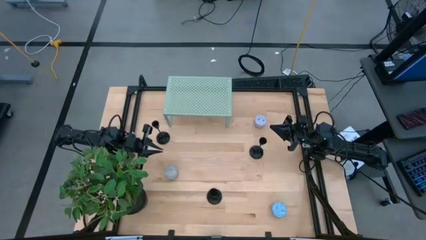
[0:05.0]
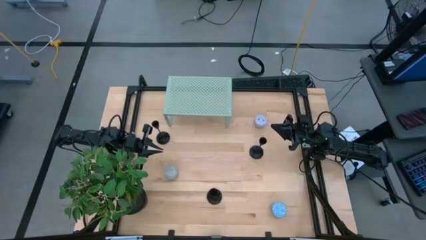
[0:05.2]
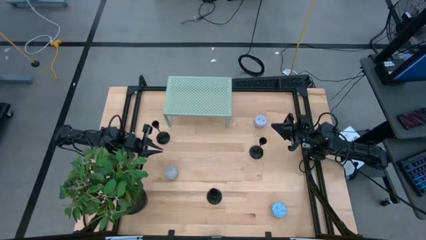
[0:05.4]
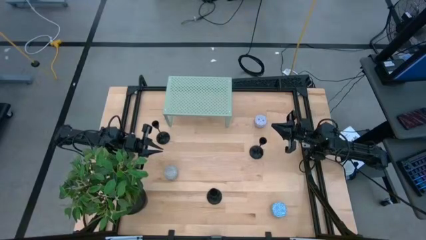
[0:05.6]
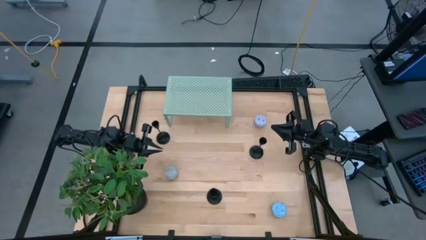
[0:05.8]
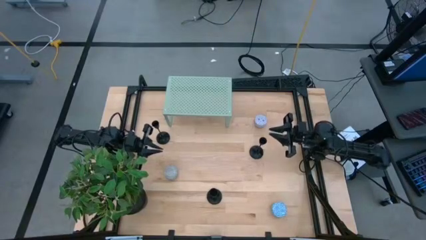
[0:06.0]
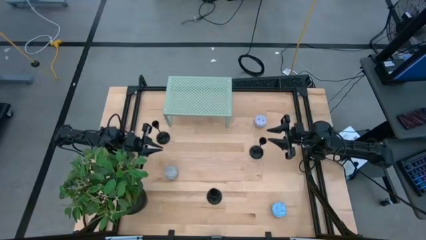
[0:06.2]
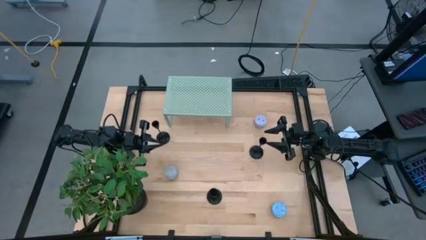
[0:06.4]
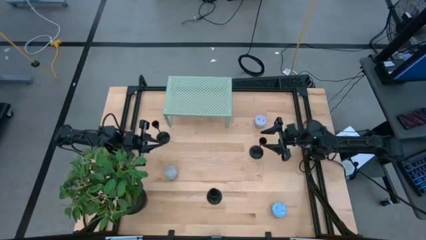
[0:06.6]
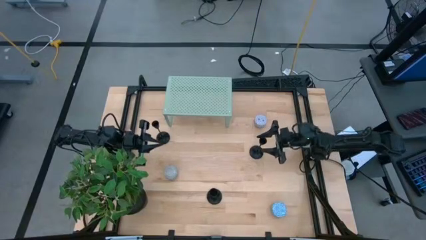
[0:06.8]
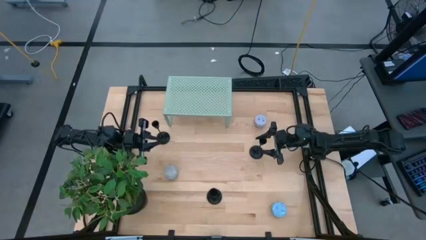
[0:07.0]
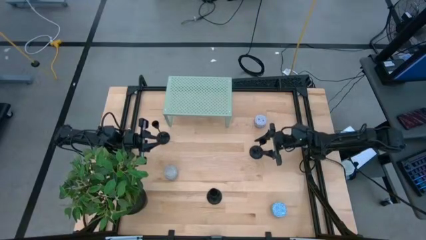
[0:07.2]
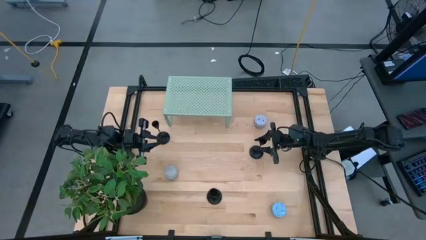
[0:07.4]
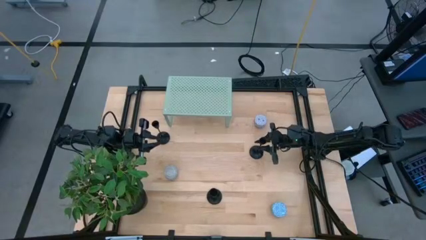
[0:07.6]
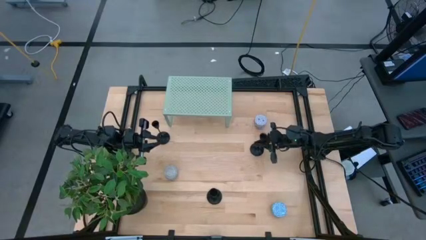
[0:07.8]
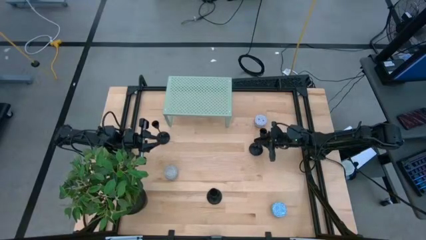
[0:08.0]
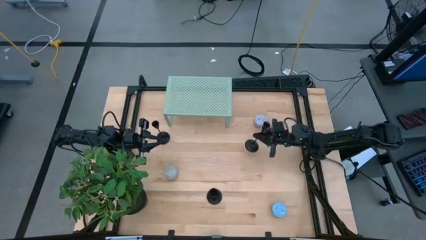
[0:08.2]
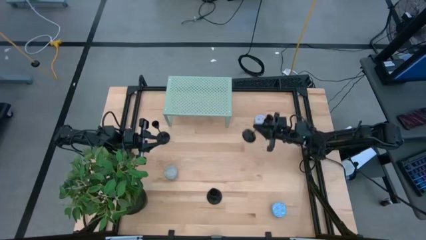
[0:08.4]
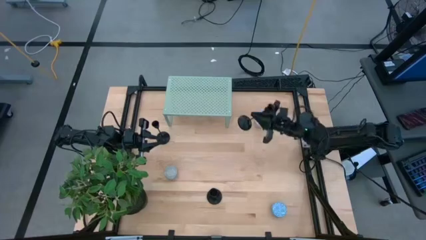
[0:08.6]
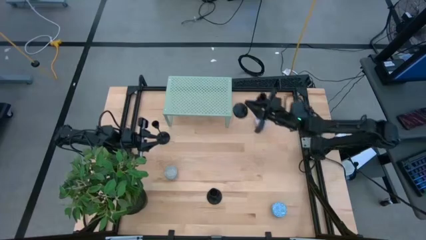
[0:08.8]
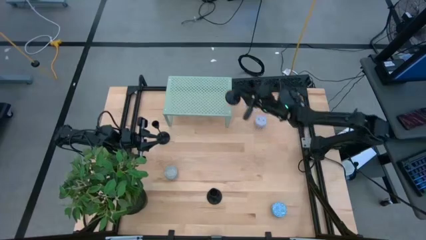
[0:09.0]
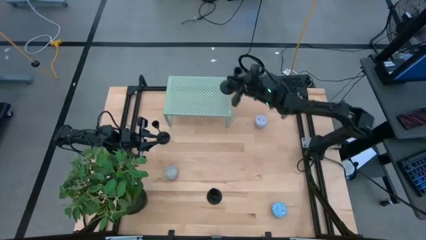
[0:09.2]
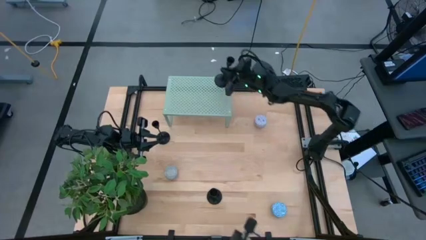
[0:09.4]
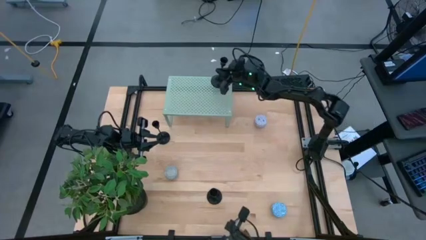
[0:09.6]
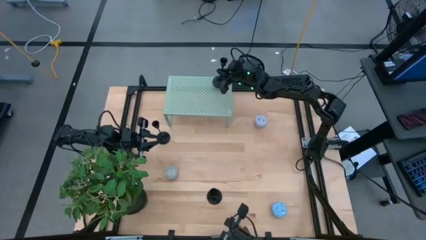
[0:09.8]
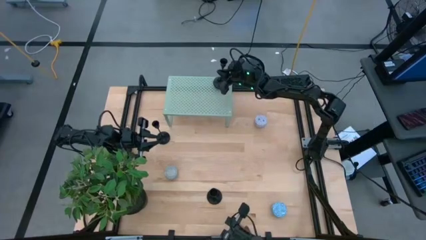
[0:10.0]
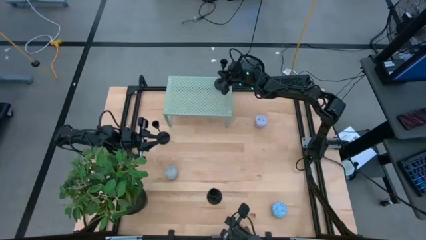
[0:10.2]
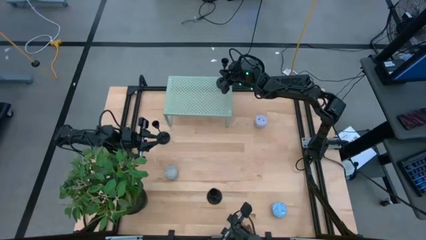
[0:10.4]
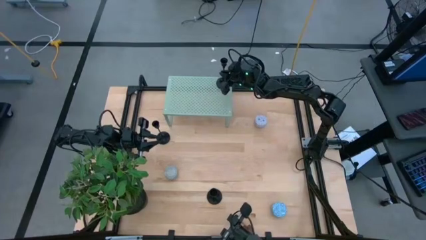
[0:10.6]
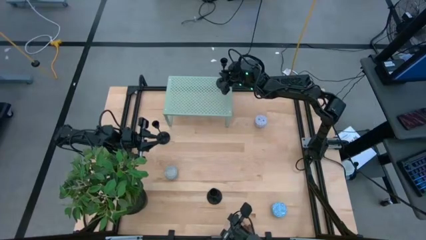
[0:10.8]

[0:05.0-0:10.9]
Task: Pick & Place candle stick holders
Put the middle right black candle holder on the shelf

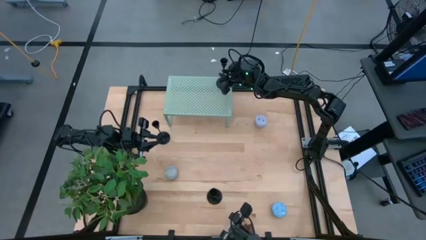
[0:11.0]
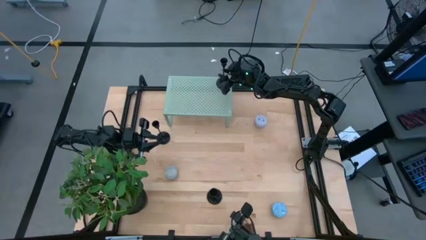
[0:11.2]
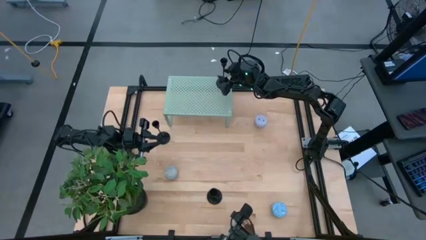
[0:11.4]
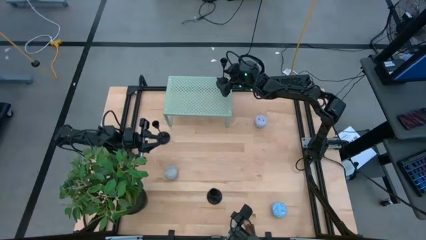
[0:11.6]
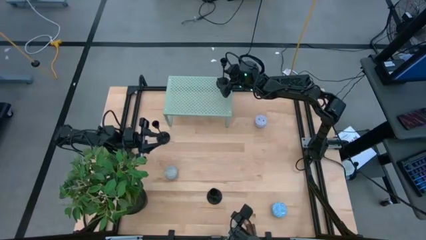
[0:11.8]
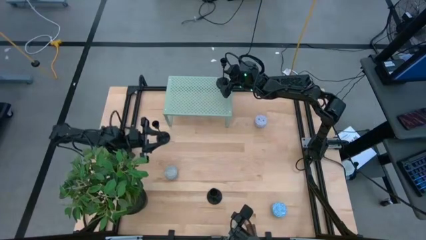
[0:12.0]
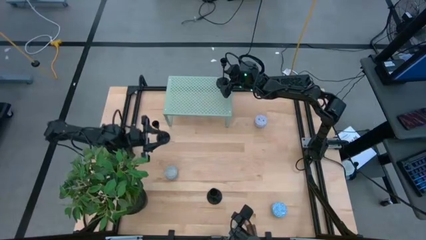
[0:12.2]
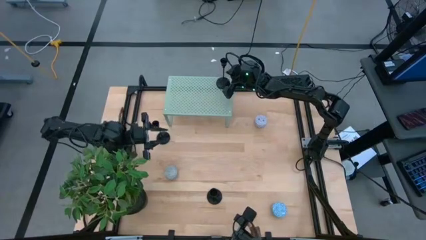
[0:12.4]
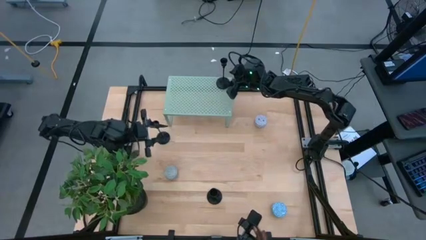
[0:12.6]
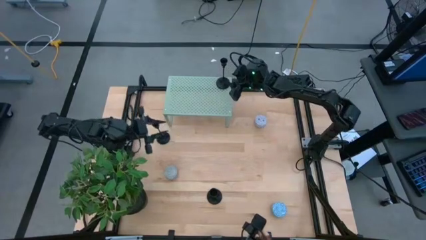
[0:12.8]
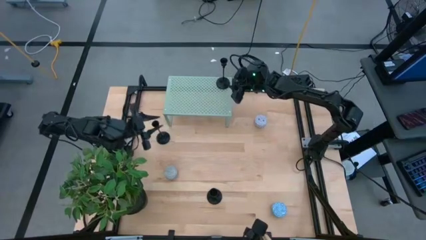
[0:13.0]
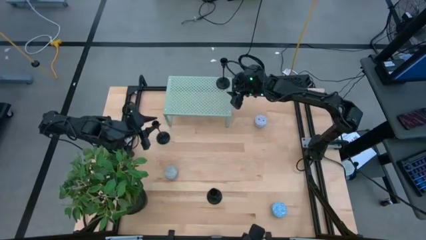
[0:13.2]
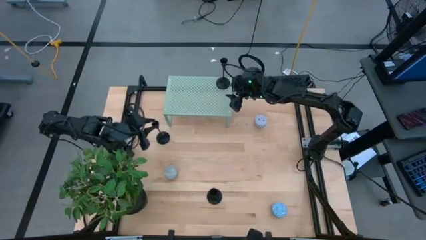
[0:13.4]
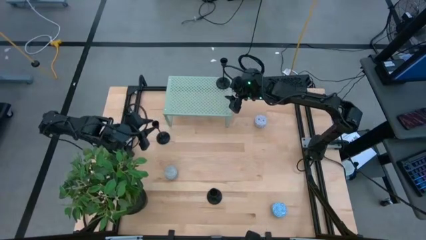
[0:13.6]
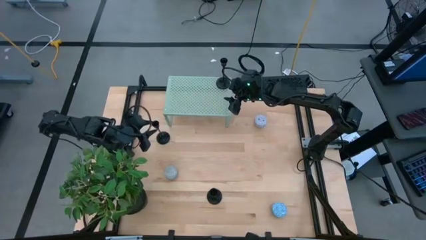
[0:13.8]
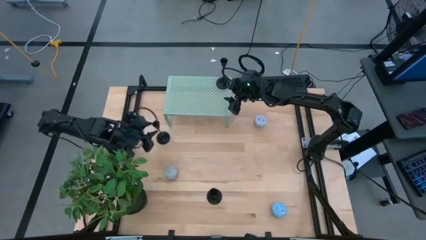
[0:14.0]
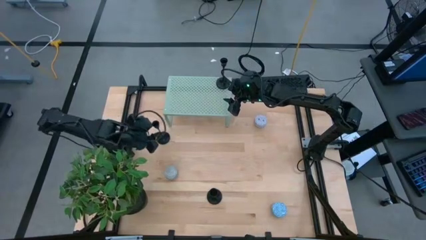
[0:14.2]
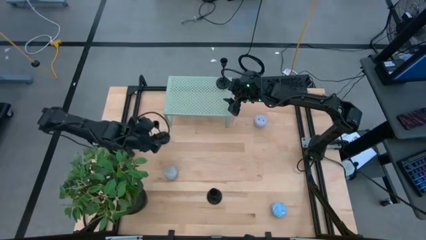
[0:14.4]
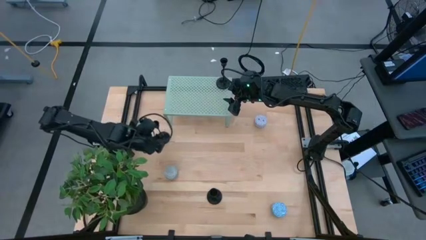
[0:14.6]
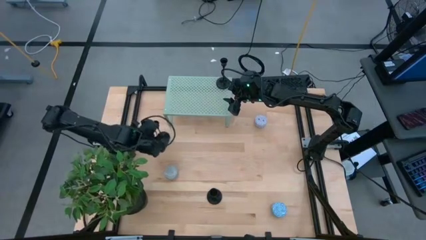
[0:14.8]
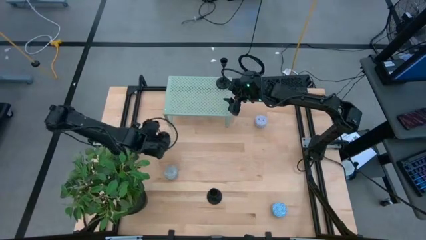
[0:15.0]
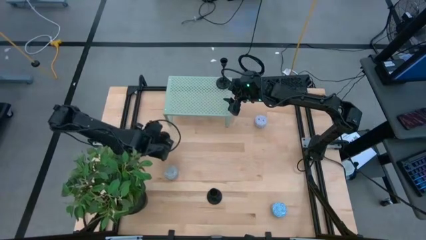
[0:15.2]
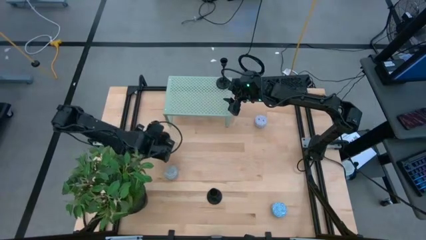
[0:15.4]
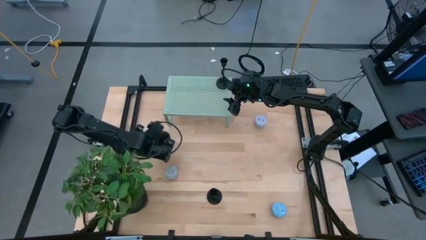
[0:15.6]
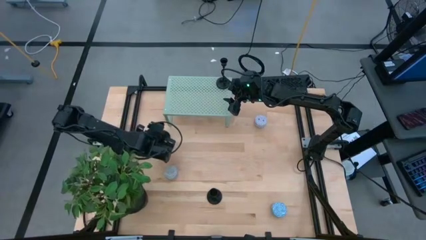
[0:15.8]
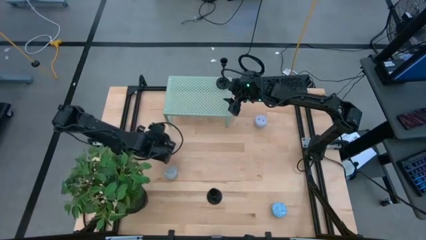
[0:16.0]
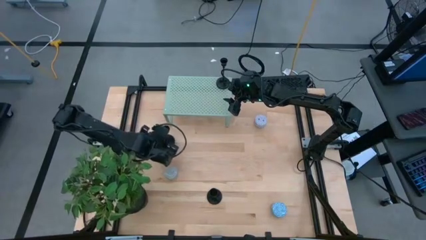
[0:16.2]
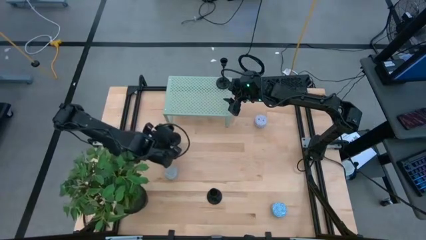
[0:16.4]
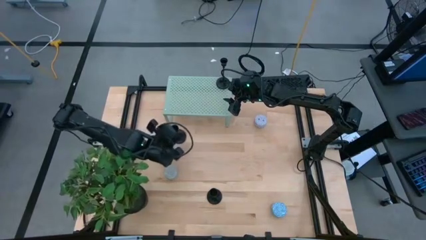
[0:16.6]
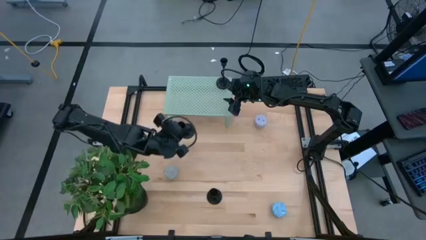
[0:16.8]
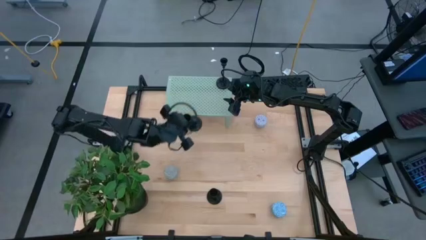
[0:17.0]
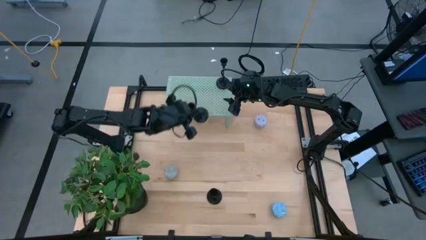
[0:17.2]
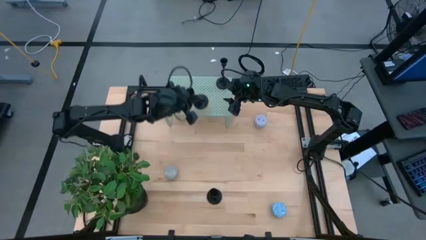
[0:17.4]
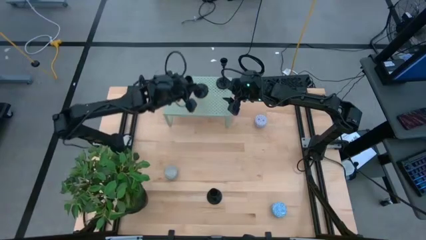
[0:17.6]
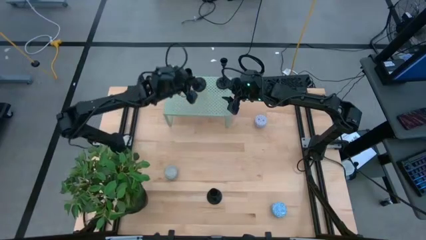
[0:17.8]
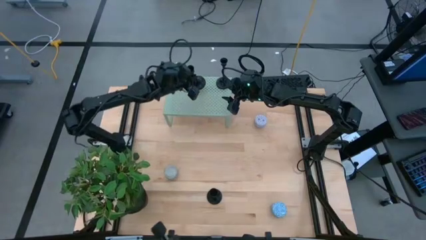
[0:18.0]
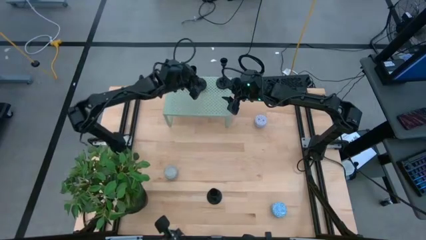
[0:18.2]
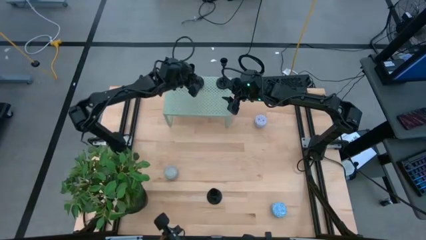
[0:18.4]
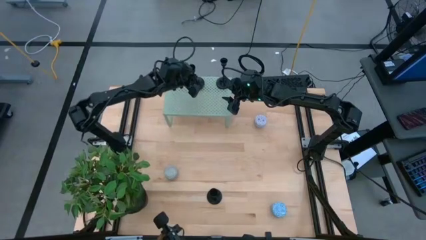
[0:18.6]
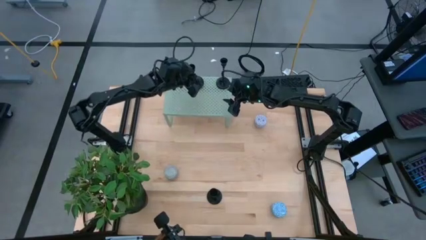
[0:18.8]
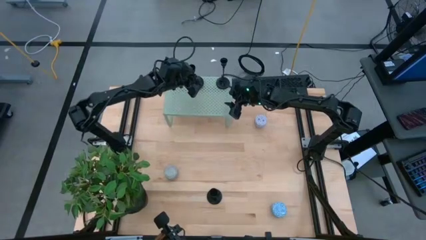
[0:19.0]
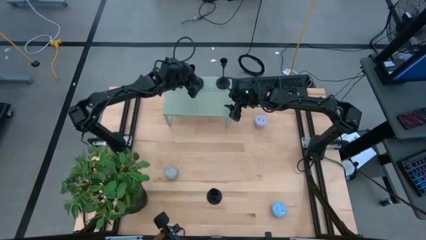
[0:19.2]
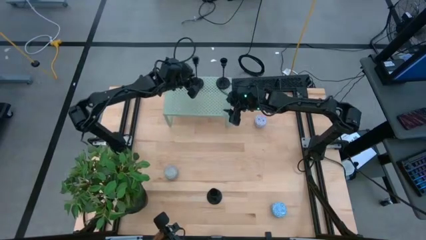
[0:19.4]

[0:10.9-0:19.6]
Put the top black candle holder on the shelf

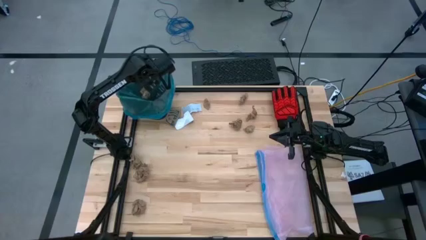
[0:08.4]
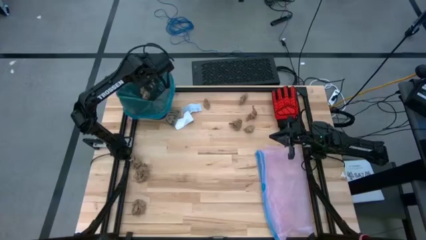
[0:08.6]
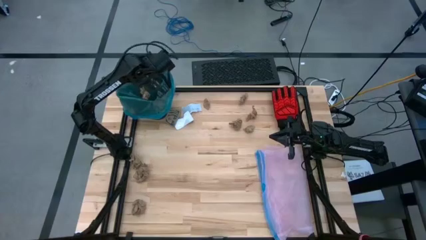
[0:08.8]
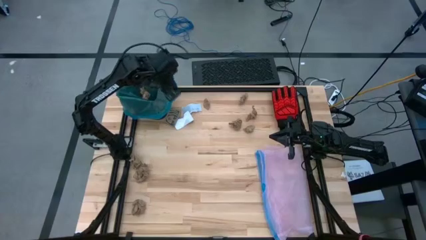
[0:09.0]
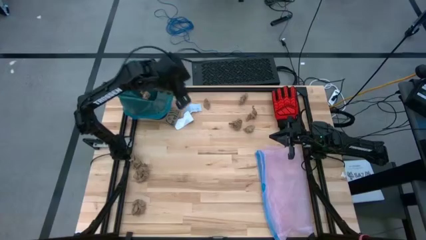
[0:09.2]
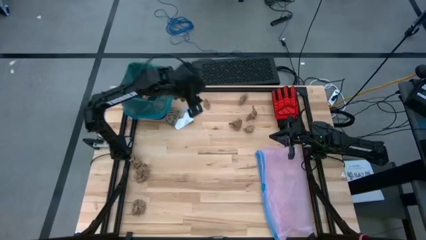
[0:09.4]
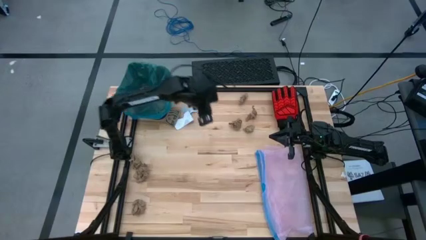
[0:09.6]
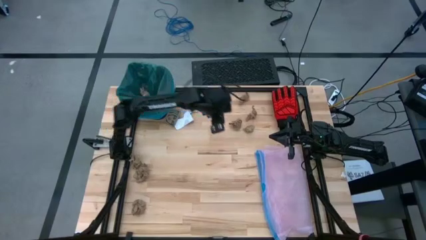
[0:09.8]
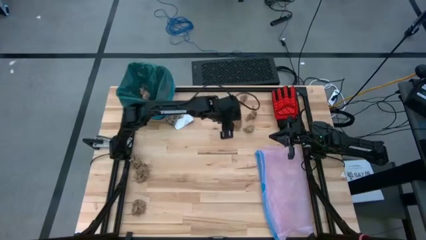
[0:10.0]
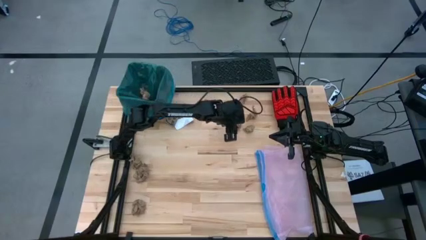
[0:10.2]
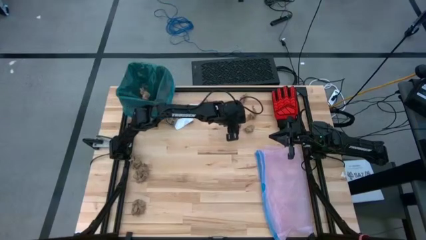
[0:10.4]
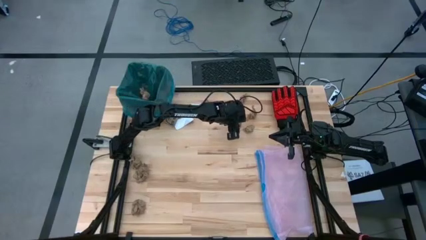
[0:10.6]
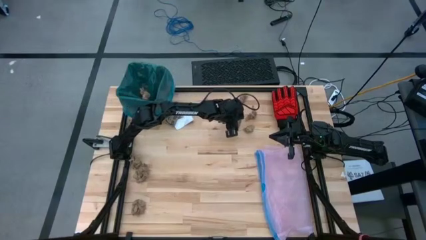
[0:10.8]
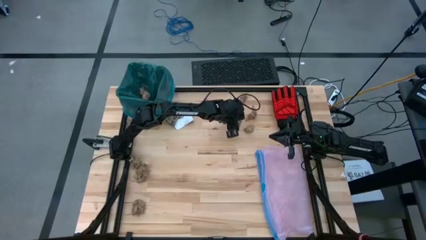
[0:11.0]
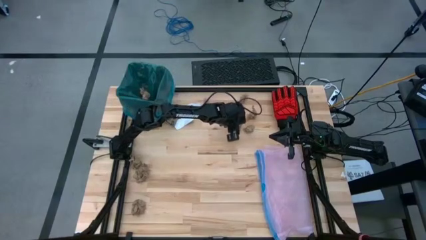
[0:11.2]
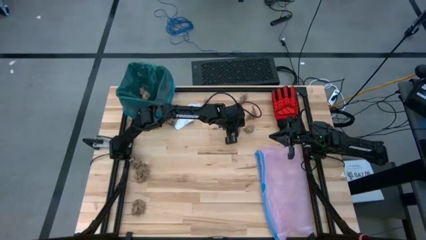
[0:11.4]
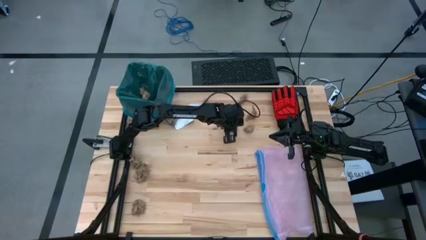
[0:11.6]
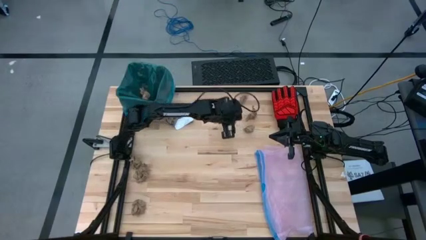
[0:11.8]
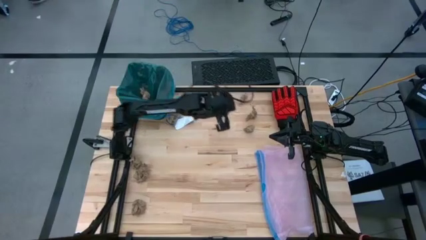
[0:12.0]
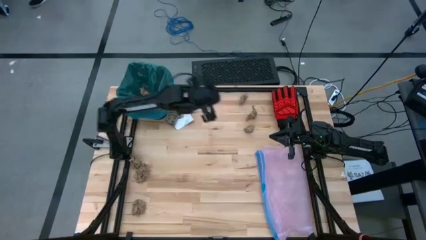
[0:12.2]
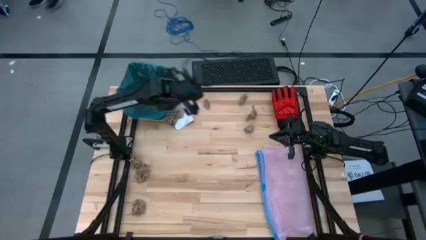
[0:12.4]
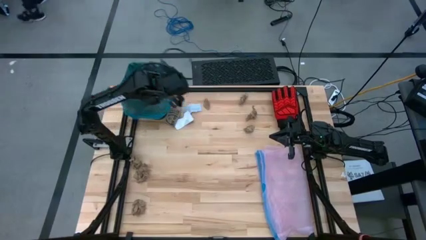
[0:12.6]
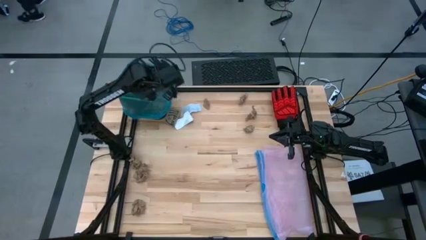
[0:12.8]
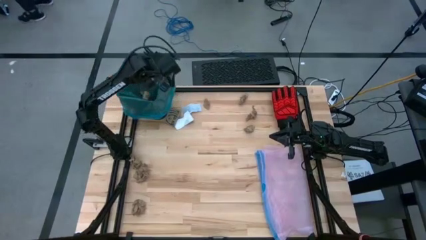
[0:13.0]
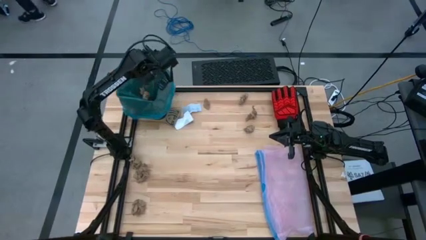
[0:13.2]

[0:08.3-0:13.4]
Task: place trash/remove bag and relplace
Put the brown paper into the black trash bin
